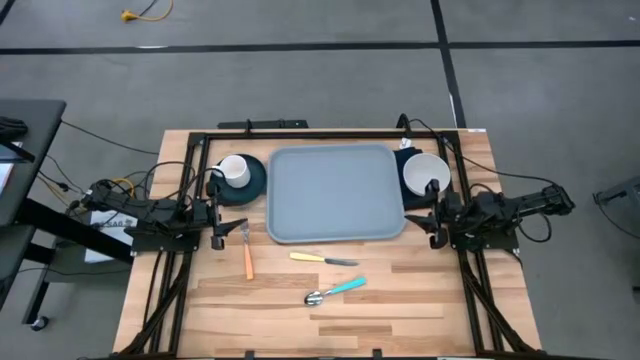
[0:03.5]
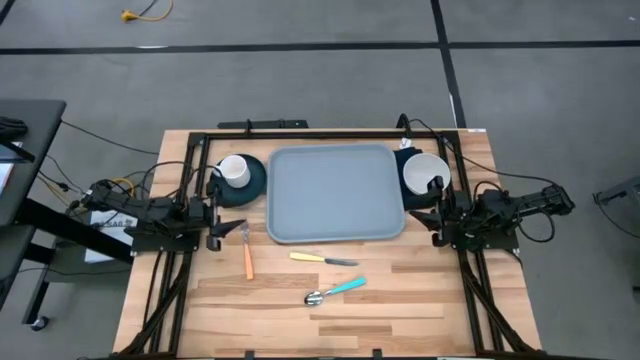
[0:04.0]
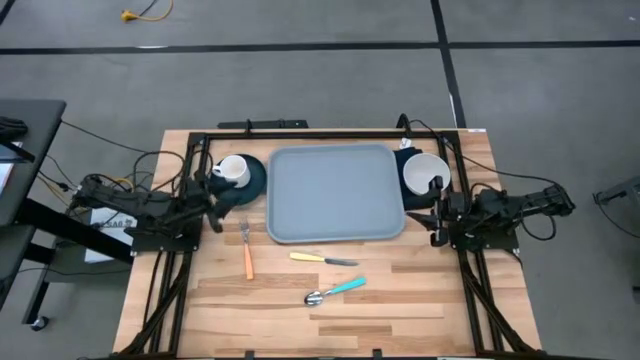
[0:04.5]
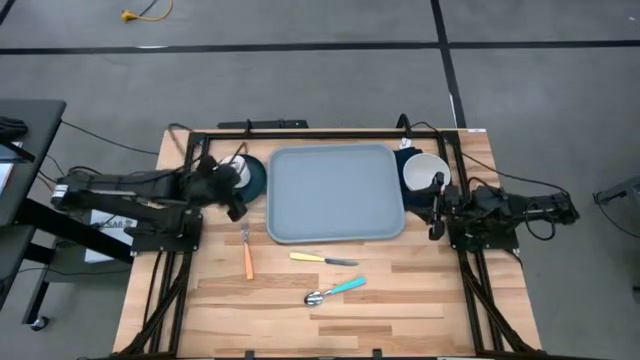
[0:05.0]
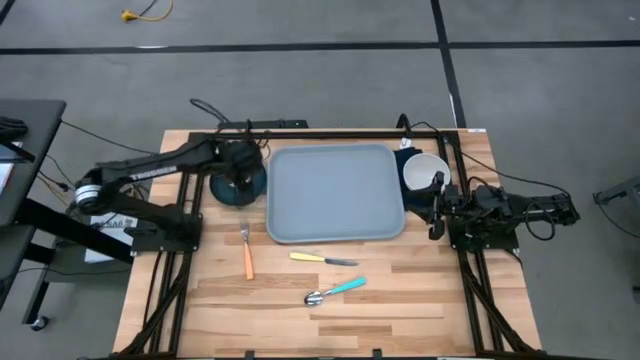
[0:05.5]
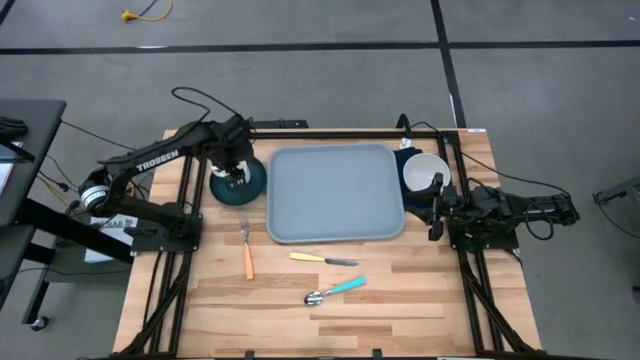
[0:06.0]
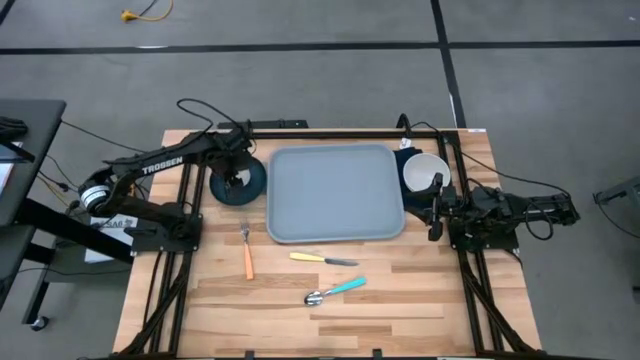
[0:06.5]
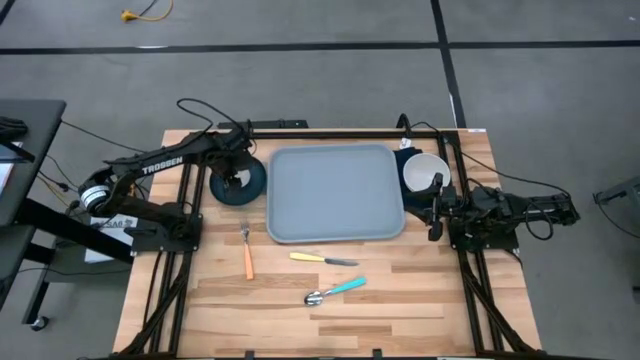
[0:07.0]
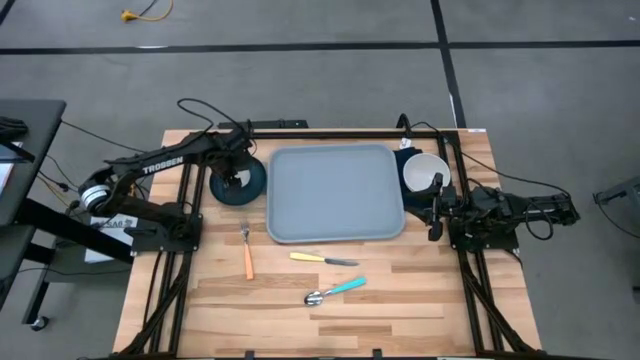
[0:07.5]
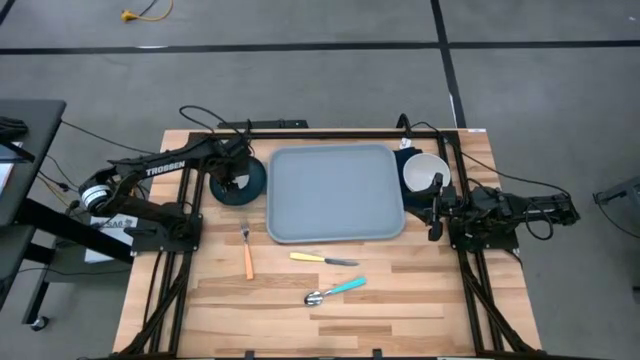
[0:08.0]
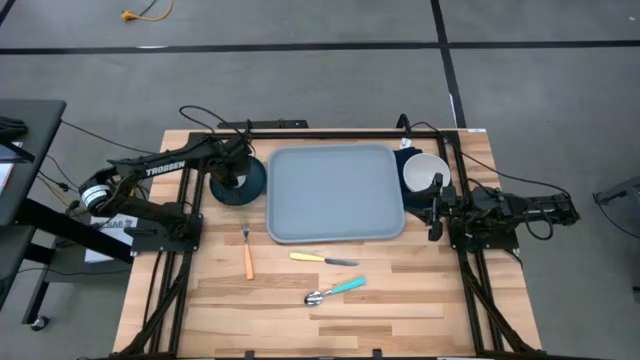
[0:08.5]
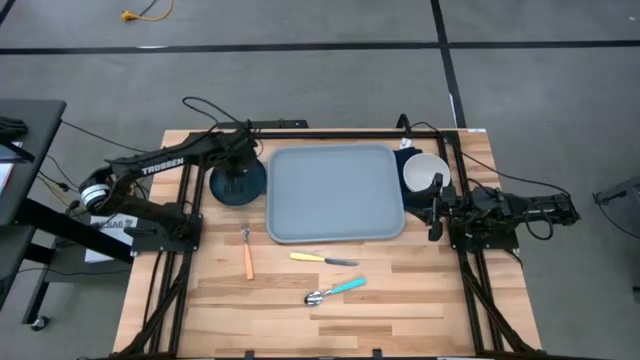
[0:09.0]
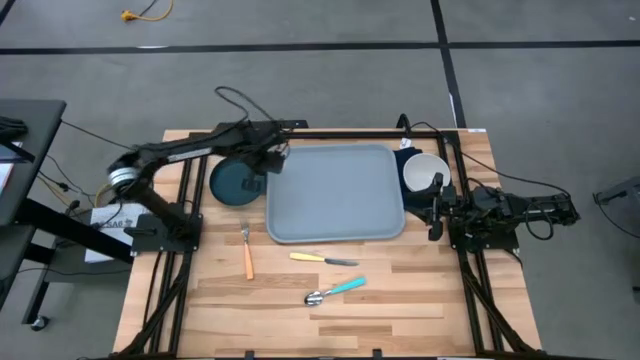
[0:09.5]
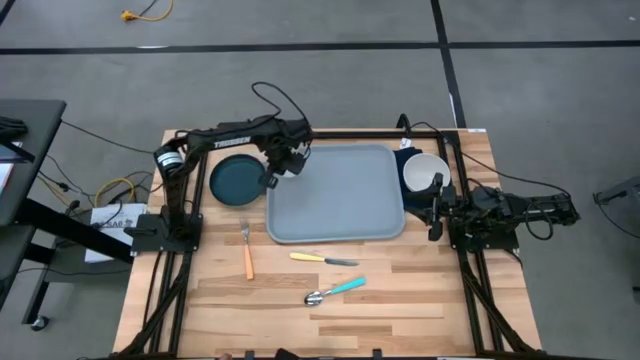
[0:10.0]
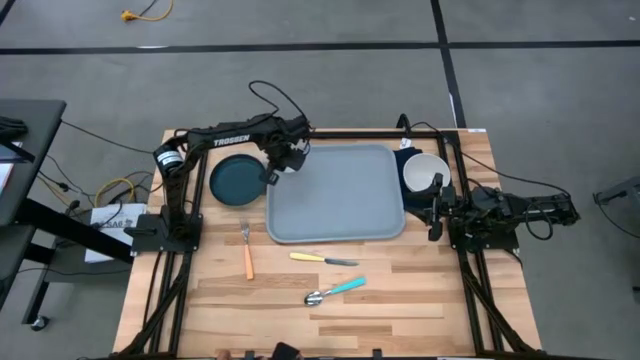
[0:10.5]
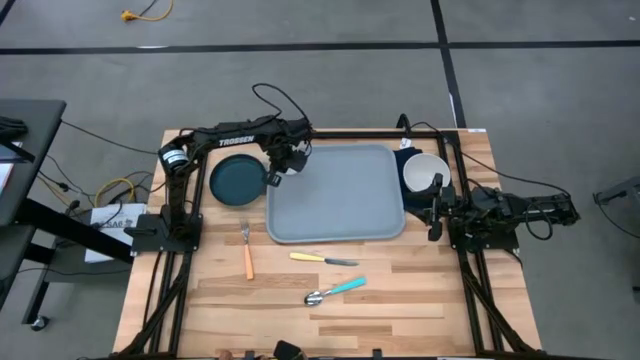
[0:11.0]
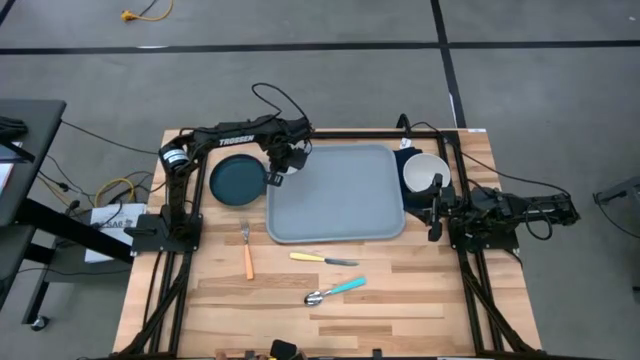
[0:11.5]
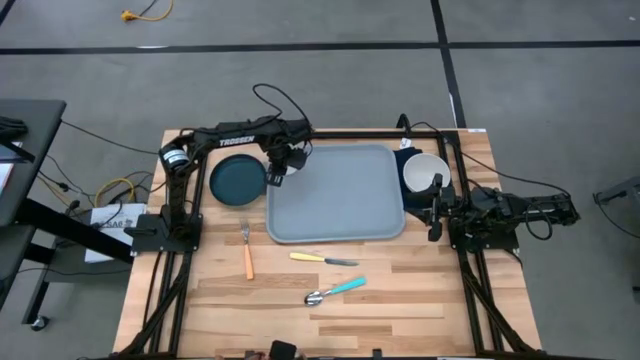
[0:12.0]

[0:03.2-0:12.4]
Task: Set up tray
Put the white mug on the gray tray

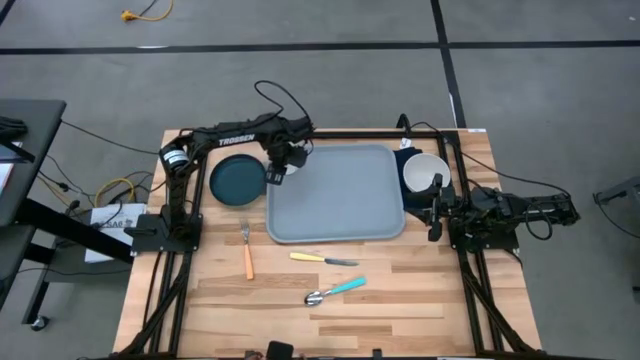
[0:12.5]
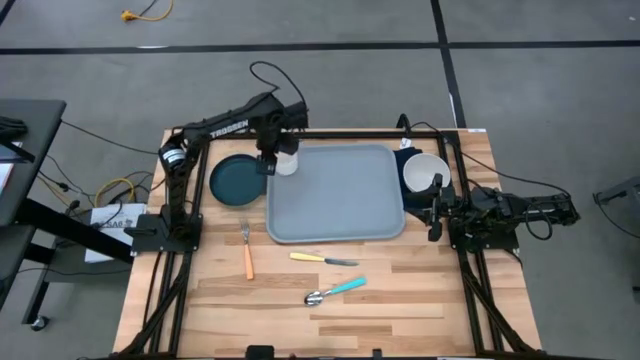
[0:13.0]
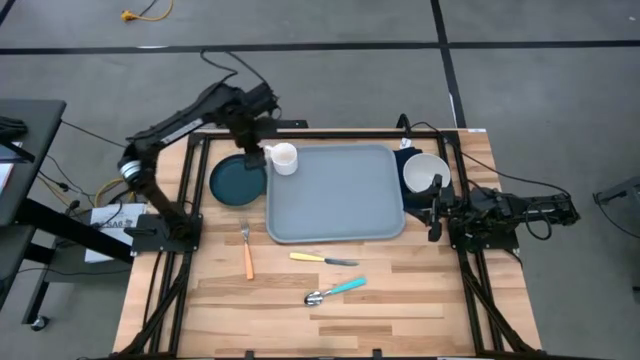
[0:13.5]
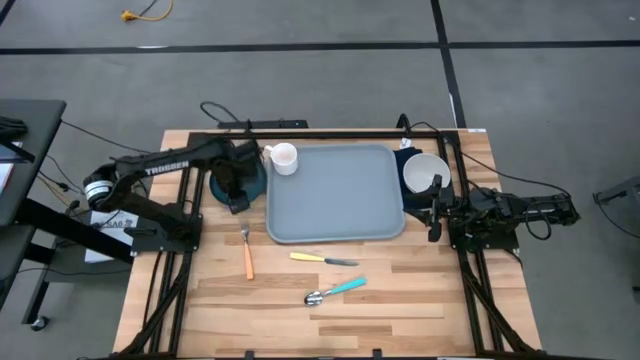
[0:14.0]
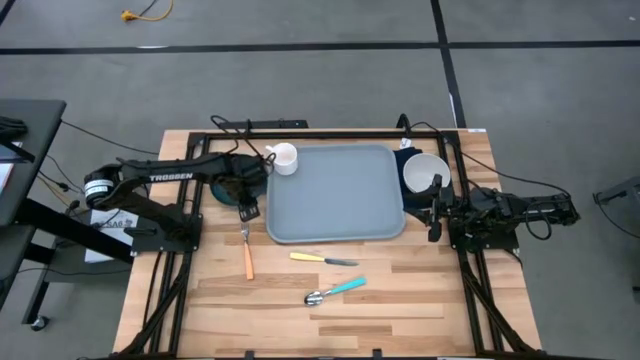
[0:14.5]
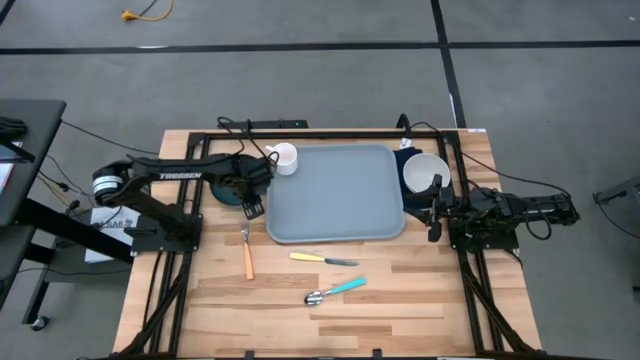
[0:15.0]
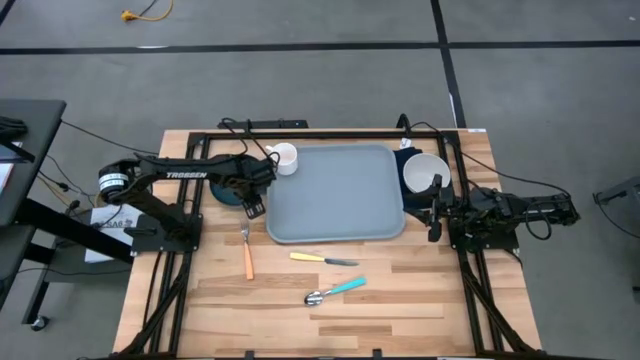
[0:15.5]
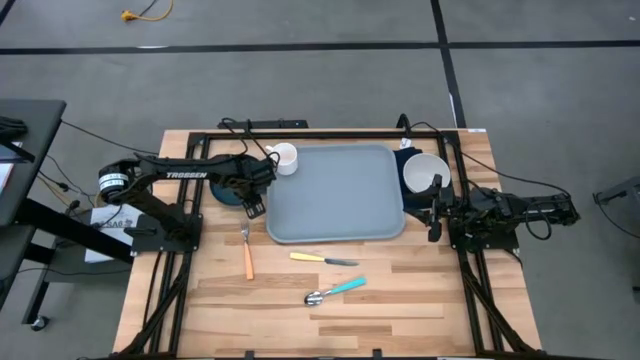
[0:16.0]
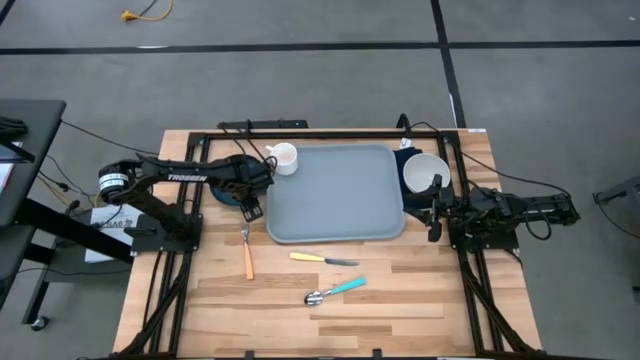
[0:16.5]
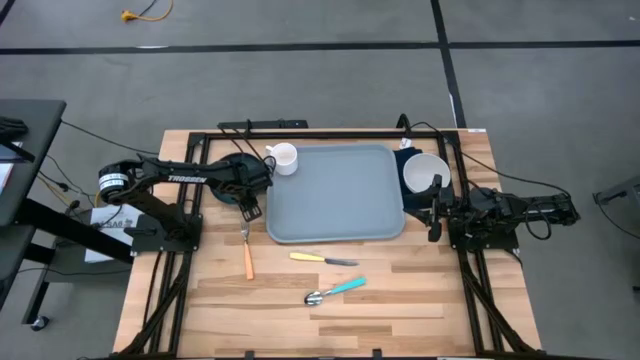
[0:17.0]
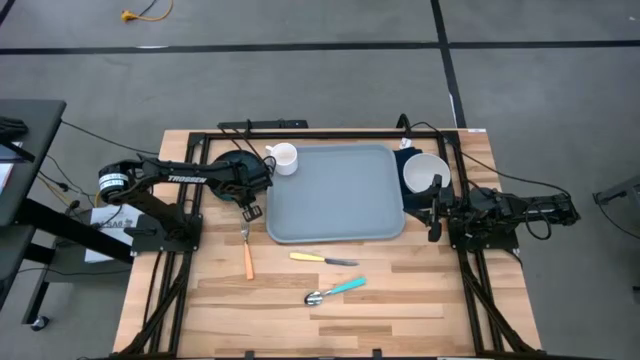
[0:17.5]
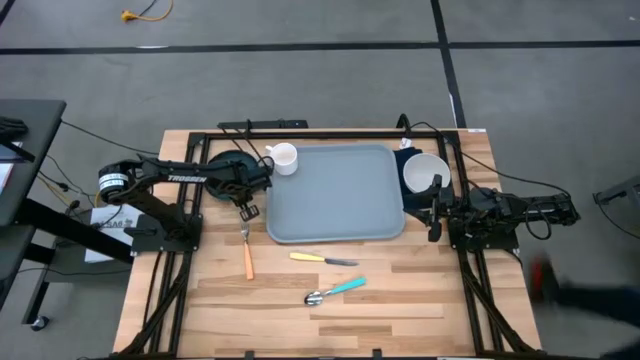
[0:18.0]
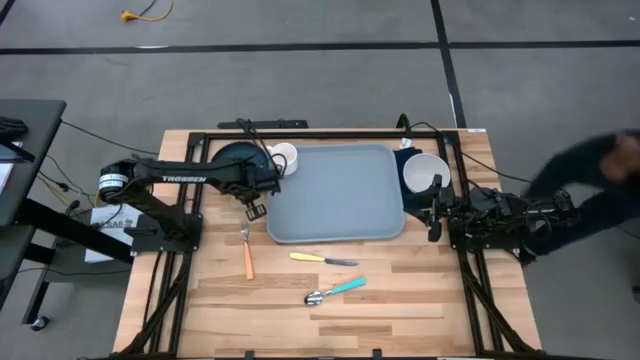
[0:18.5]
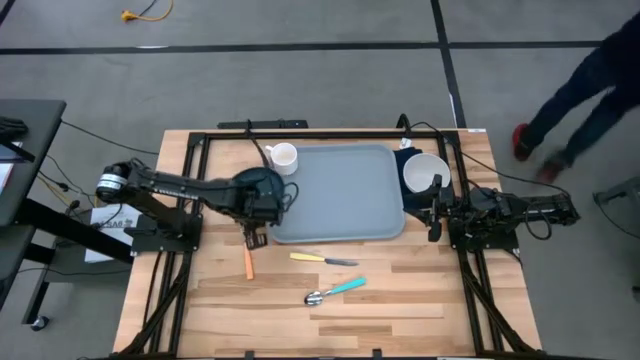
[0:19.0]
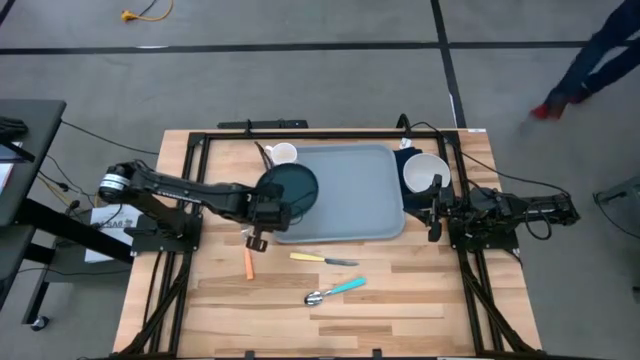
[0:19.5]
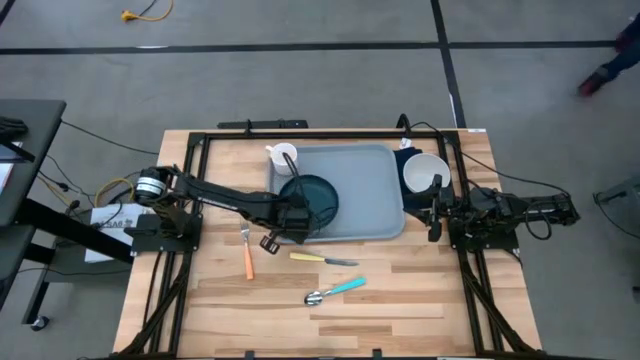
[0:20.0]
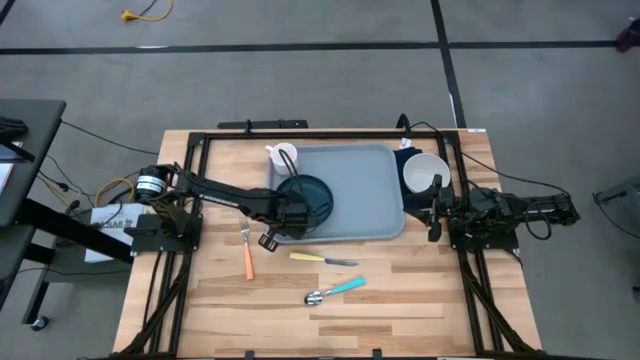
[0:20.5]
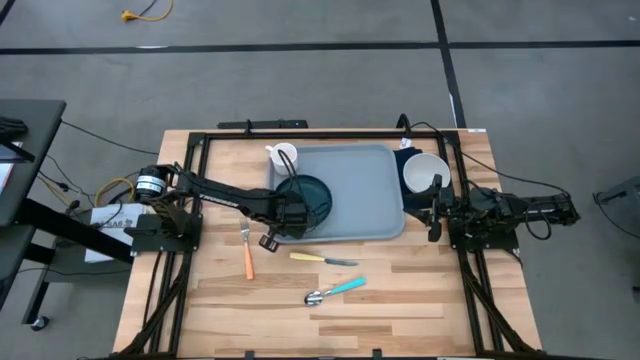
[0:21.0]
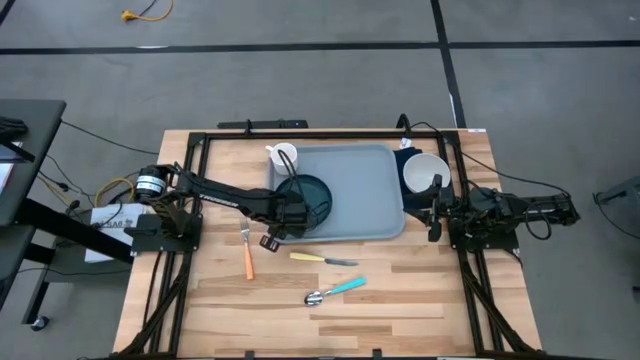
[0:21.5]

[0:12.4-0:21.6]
Put the black plate on the gray tray at the bottom of the white mug

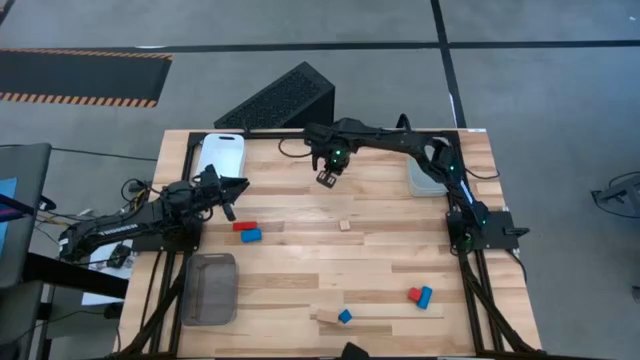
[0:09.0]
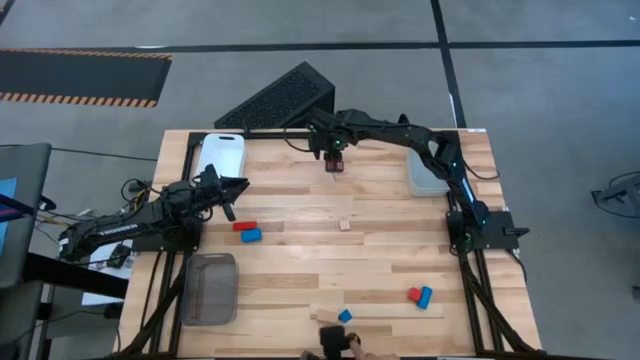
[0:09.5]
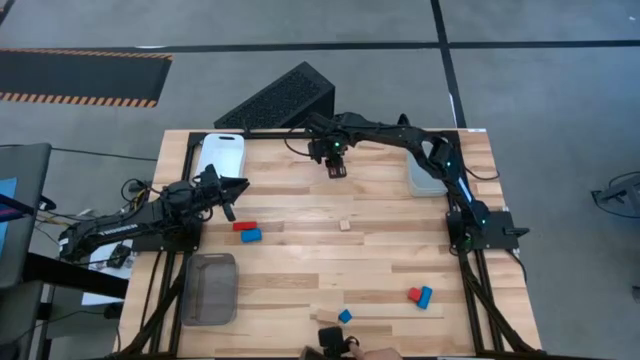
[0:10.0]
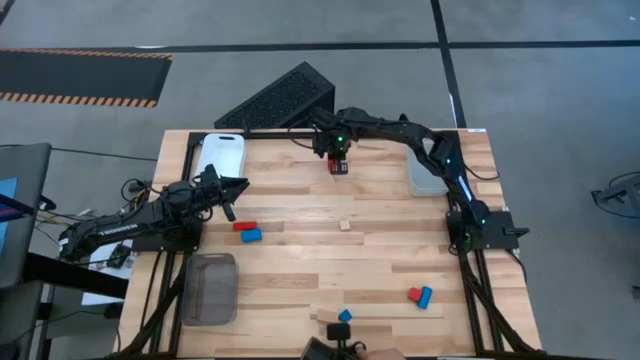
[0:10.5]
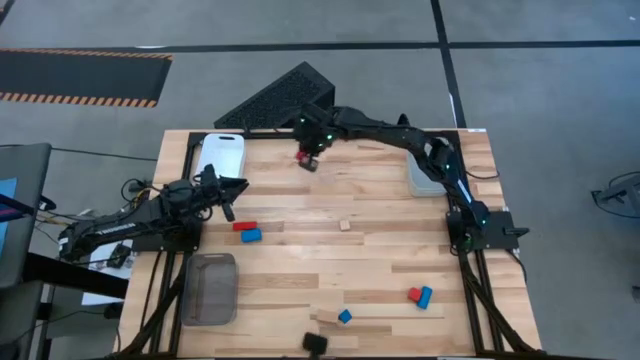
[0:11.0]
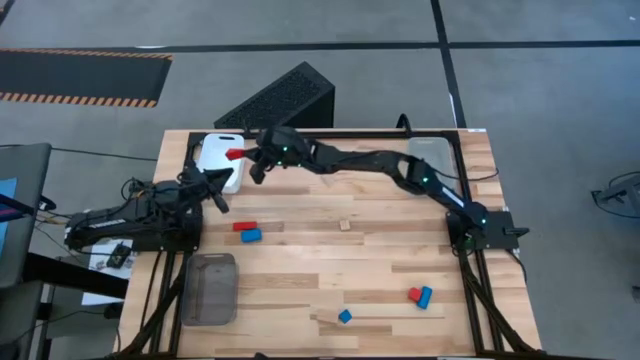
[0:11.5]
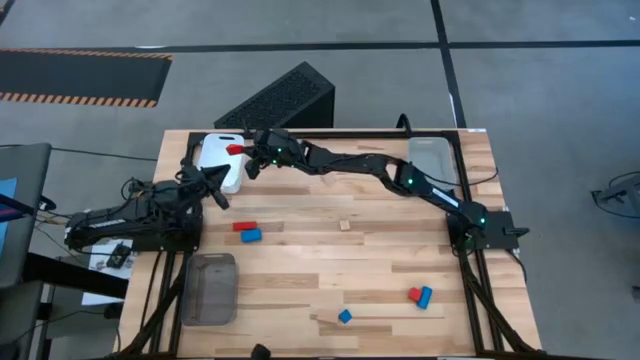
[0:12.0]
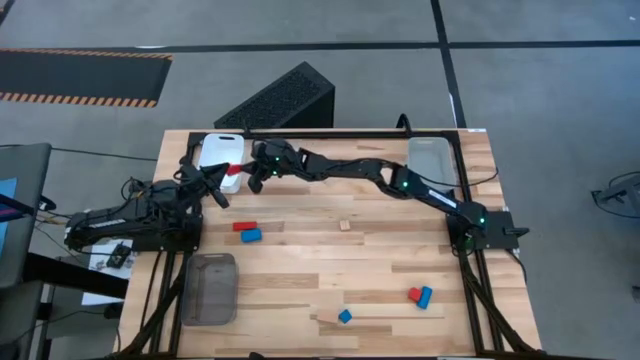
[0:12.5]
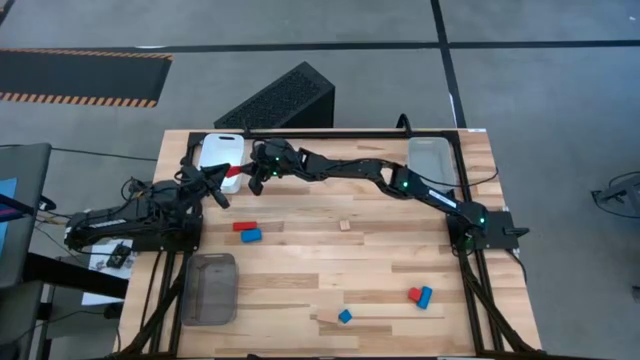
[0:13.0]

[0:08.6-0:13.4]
Task: Sort & place blocks by color
Put the top red block into the white bin
